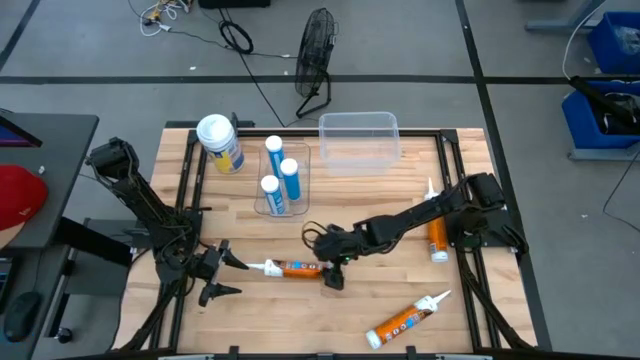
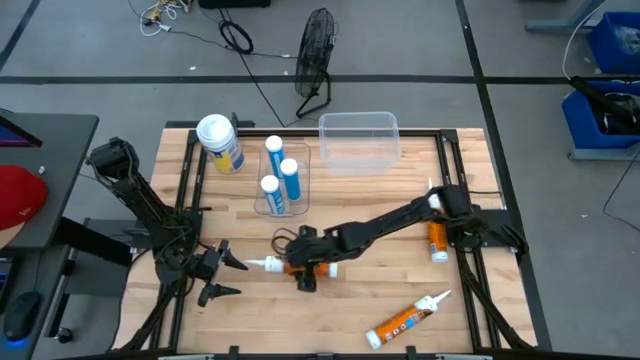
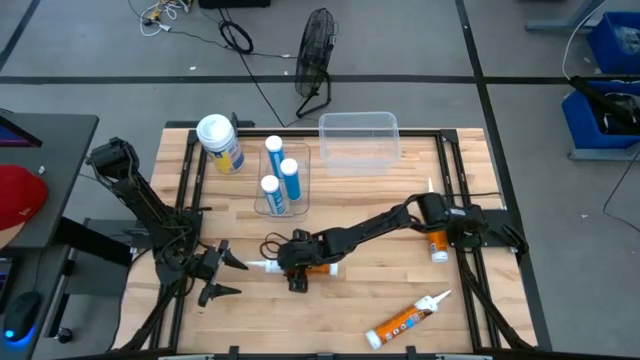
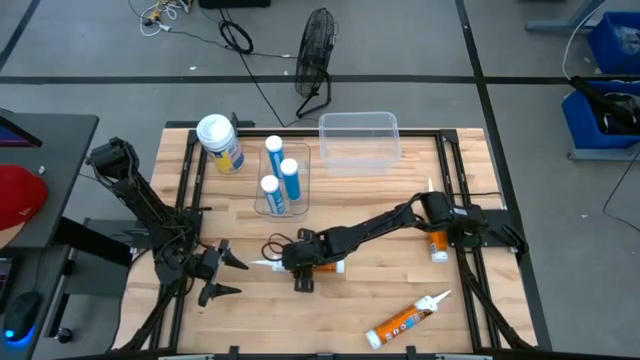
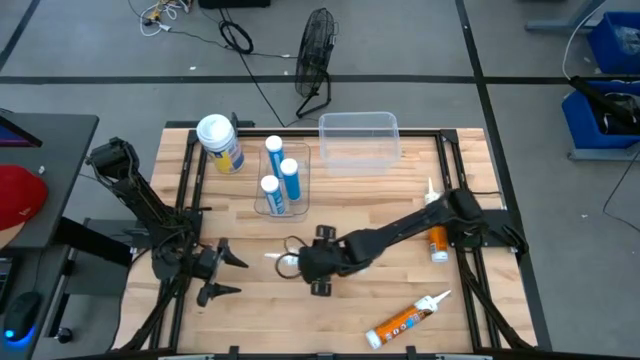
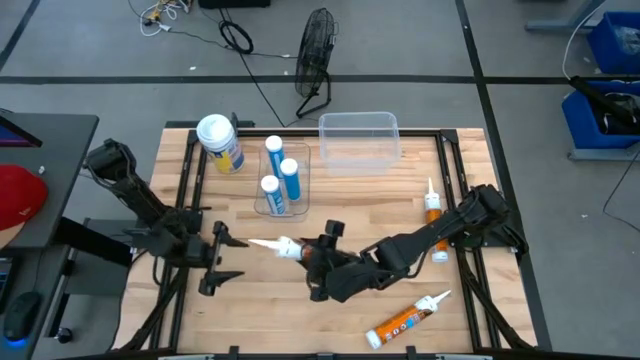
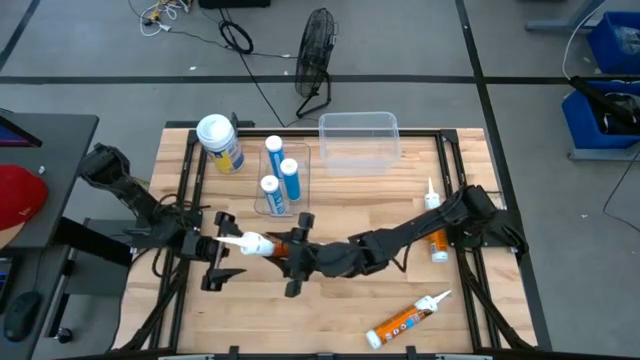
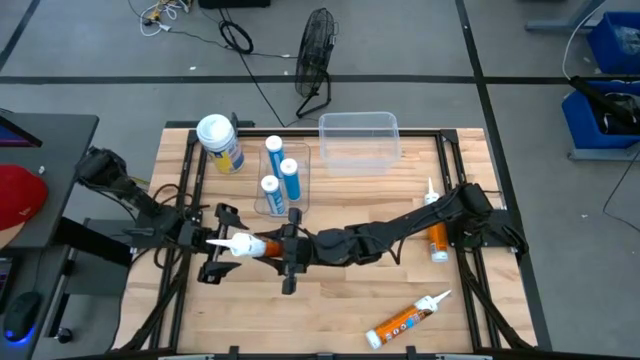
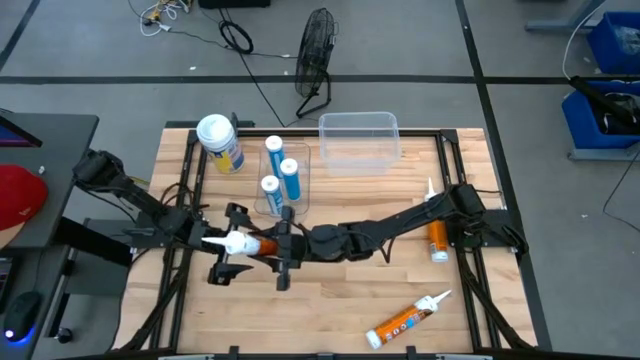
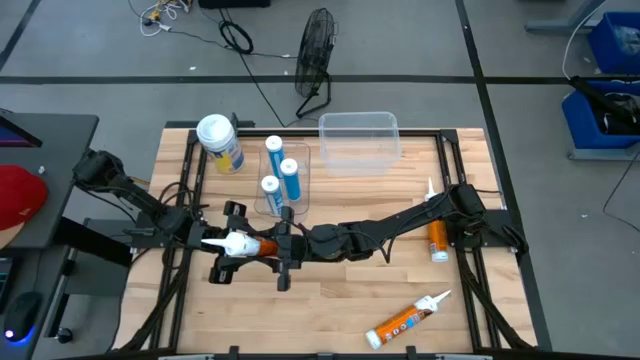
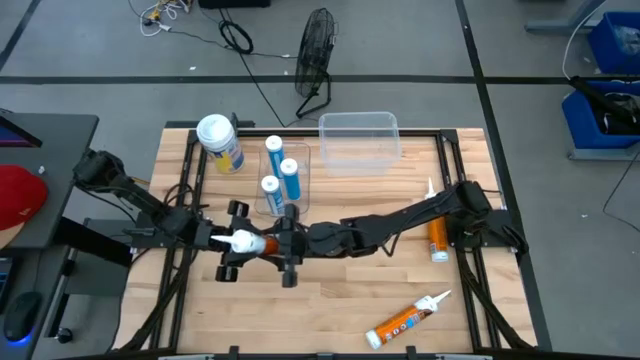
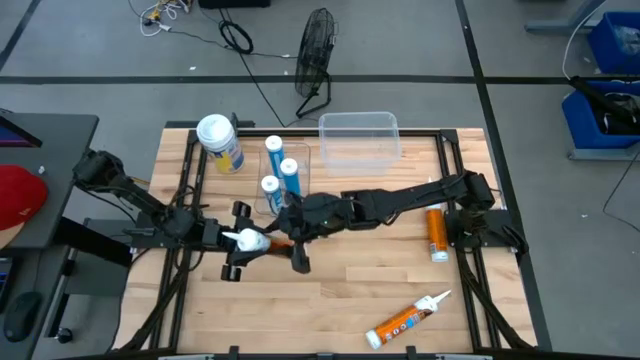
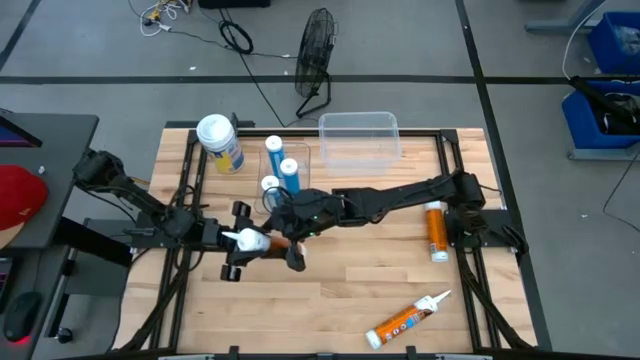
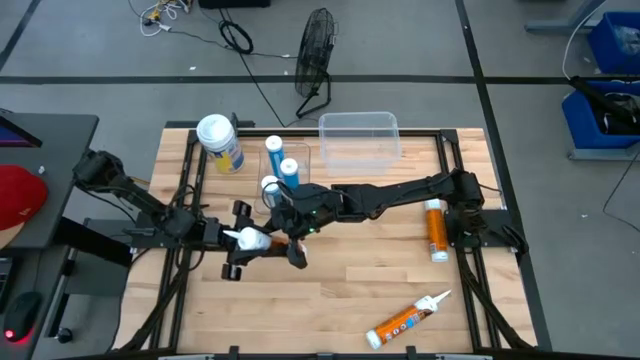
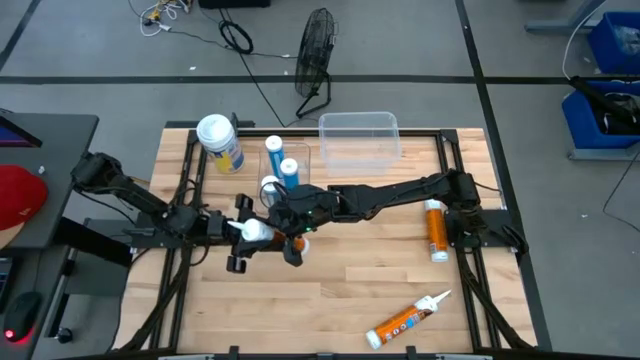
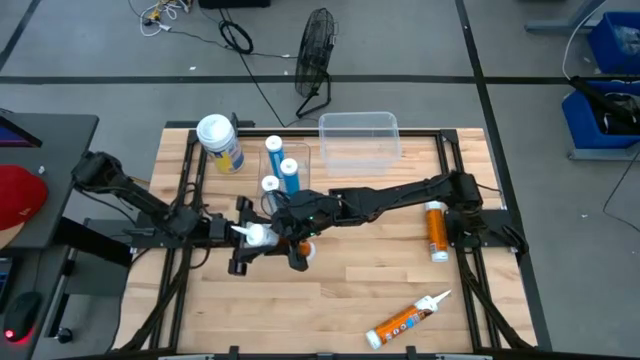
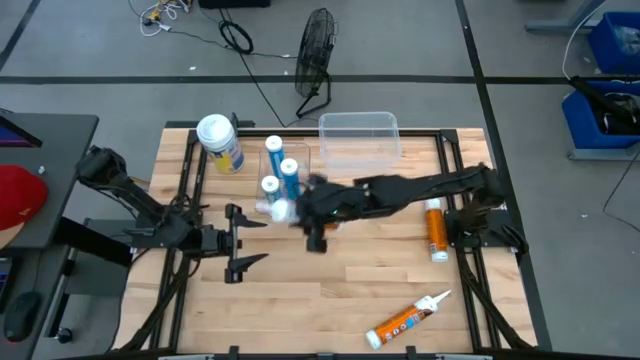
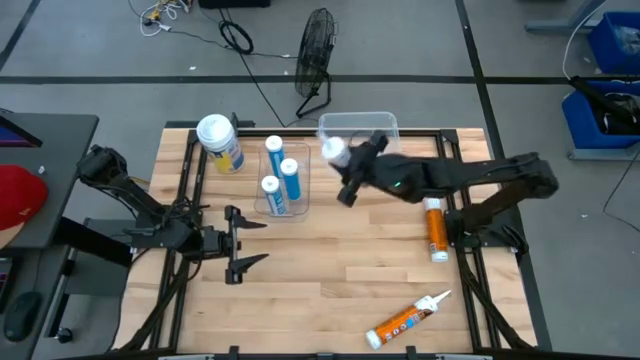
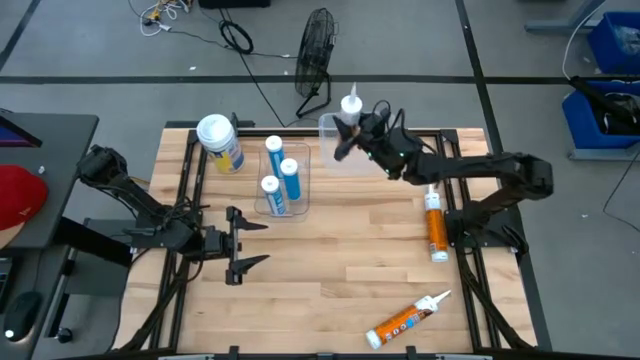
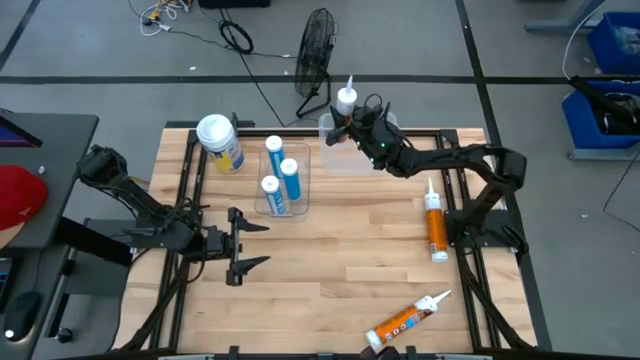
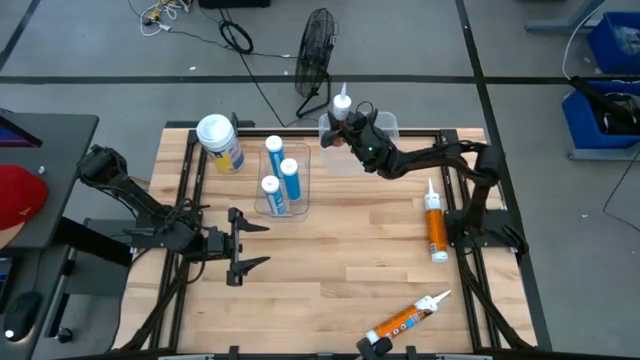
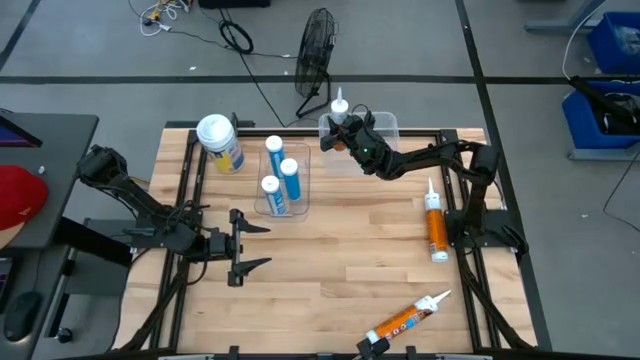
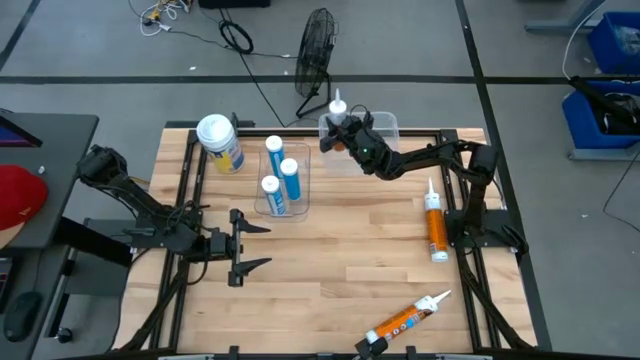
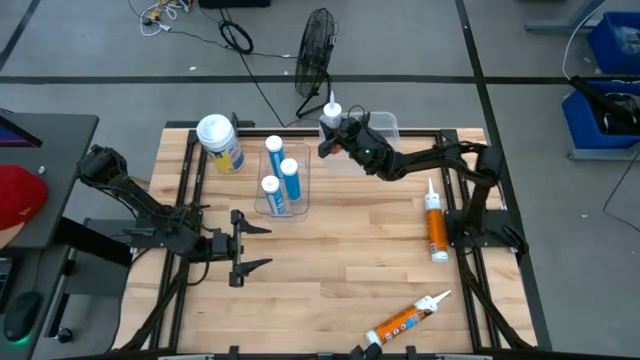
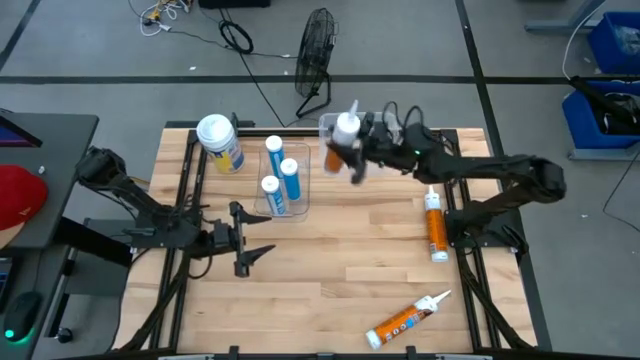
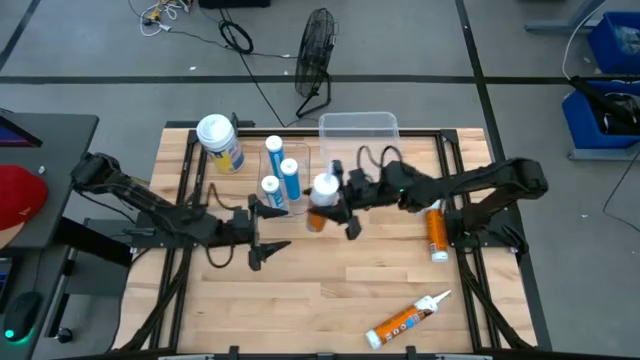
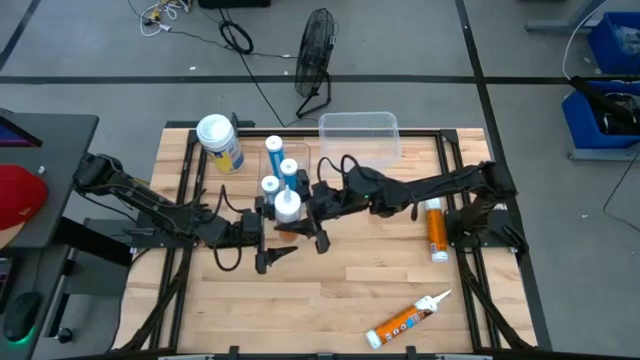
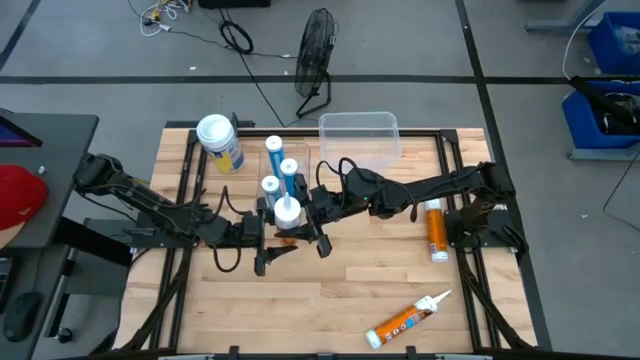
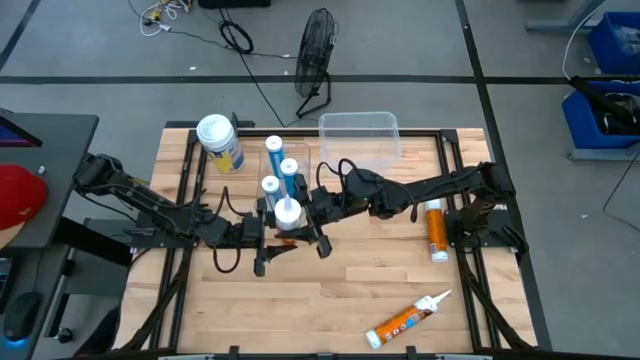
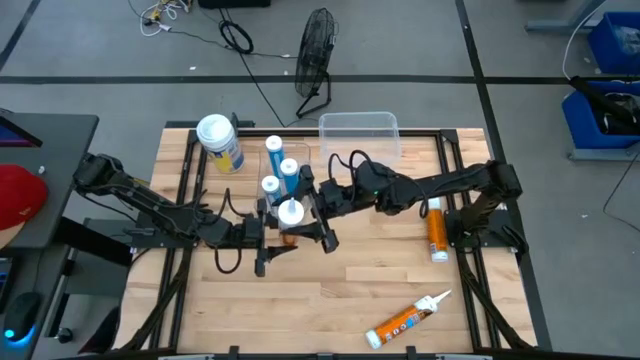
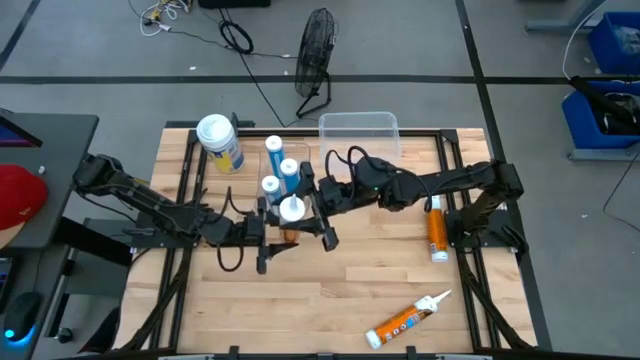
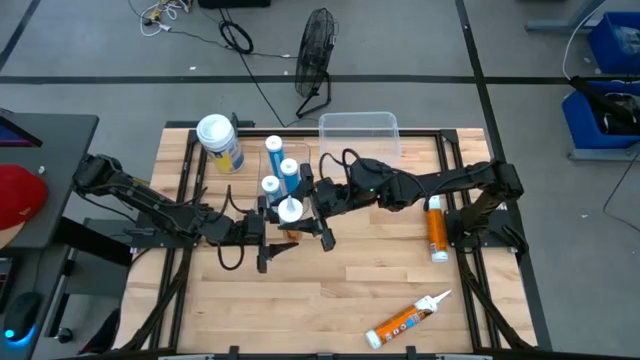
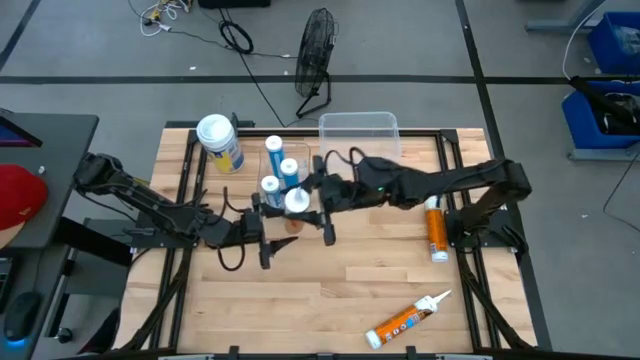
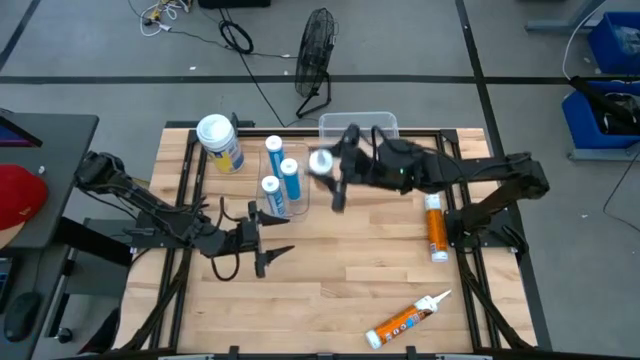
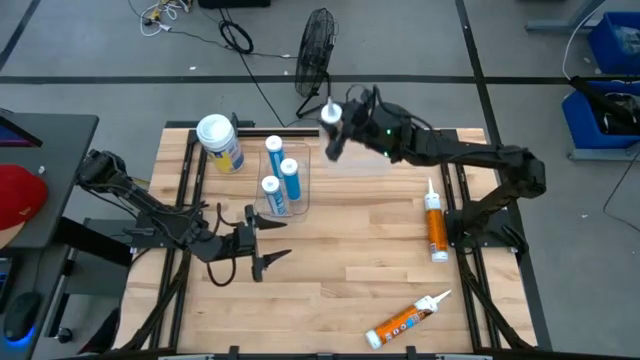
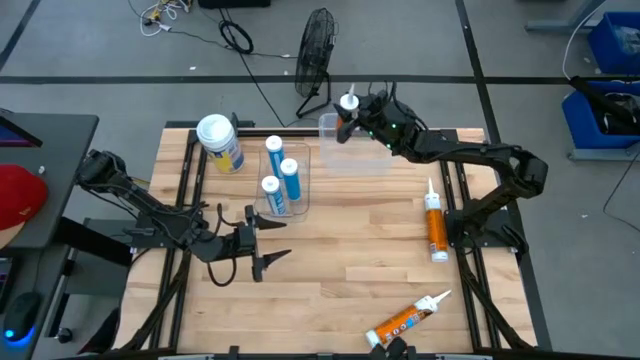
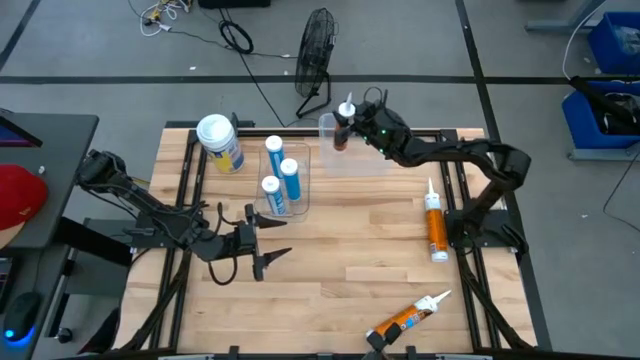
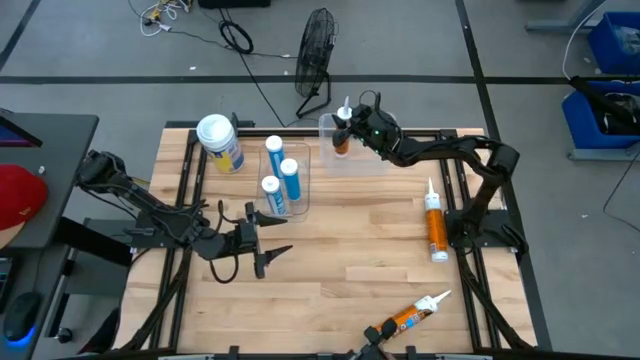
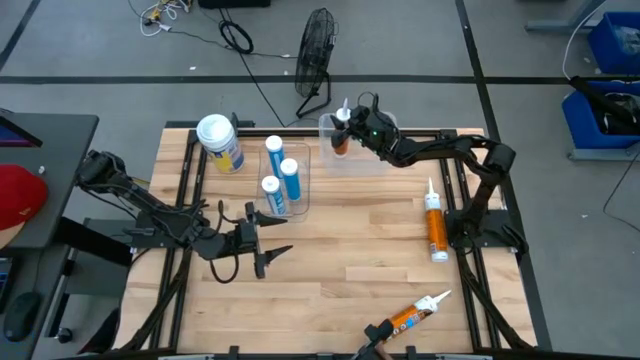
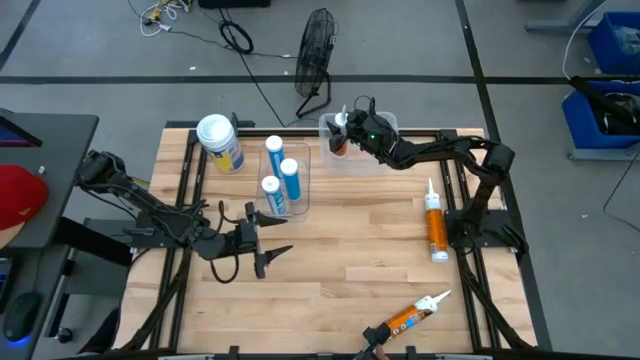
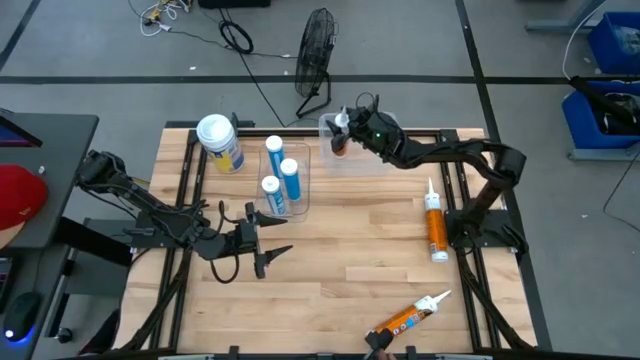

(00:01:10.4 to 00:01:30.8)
Task: Pick & place silicon tubes, Sealant and Lysol wipes
Put the middle left orange sealant into the right transparent bin
